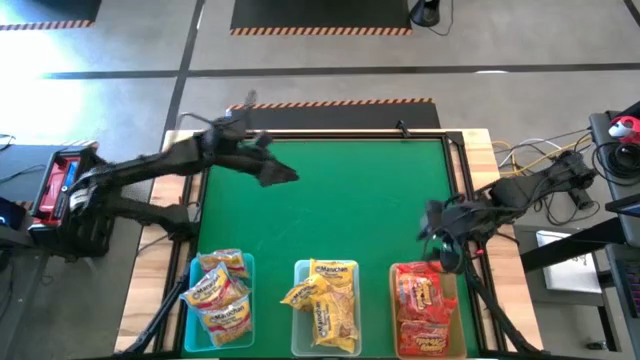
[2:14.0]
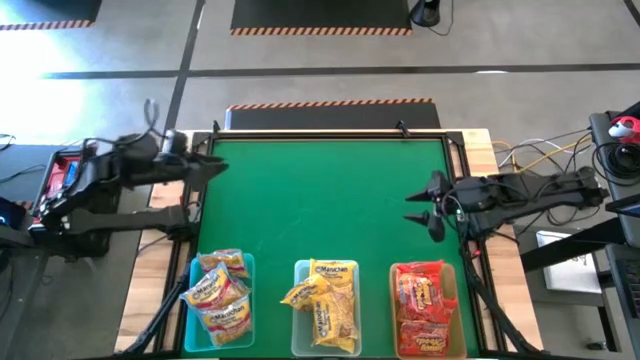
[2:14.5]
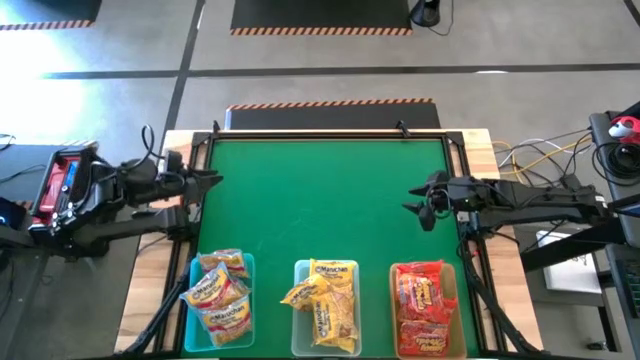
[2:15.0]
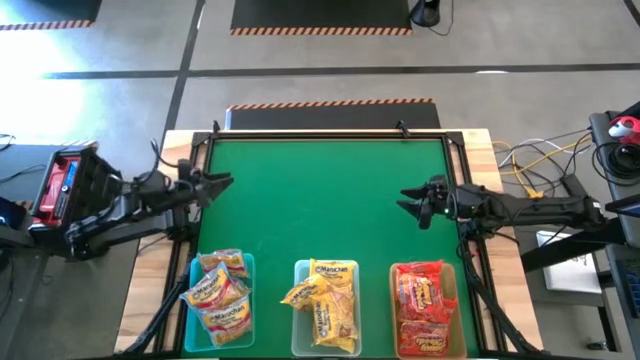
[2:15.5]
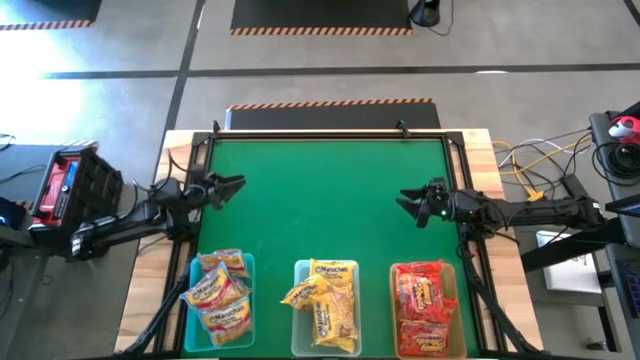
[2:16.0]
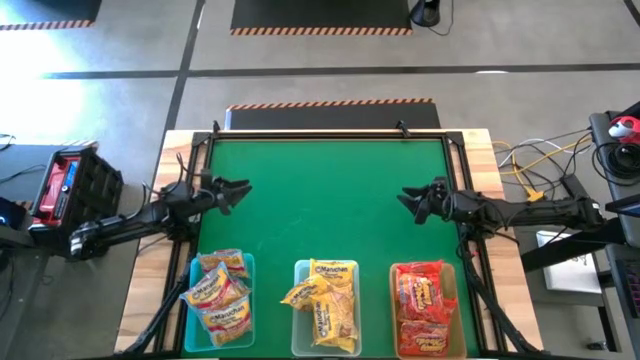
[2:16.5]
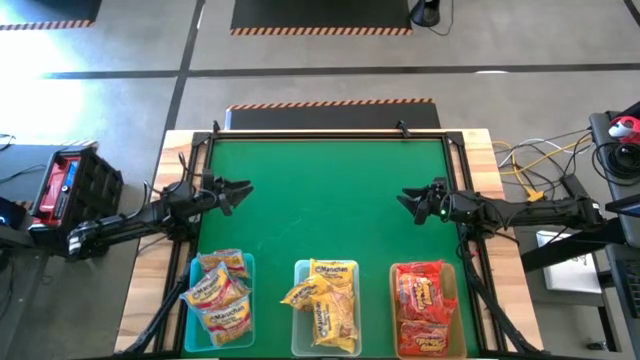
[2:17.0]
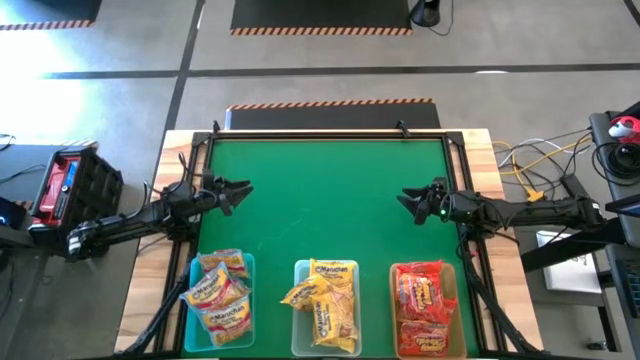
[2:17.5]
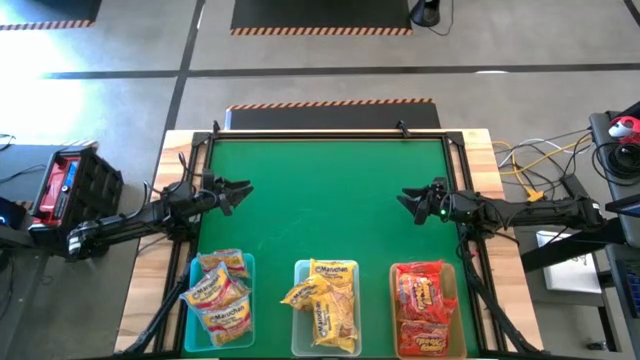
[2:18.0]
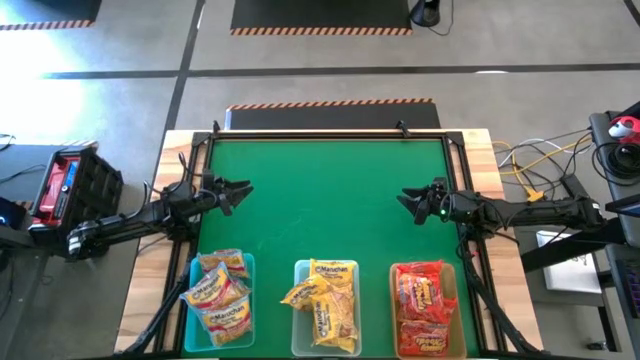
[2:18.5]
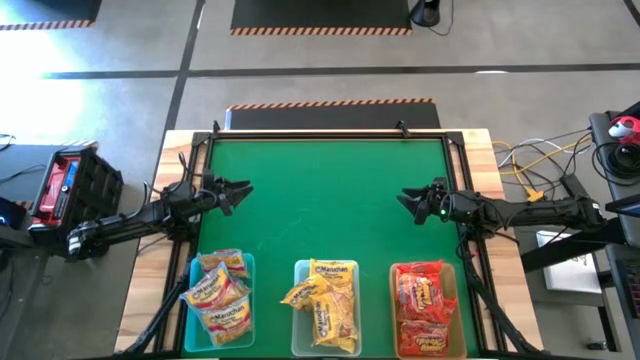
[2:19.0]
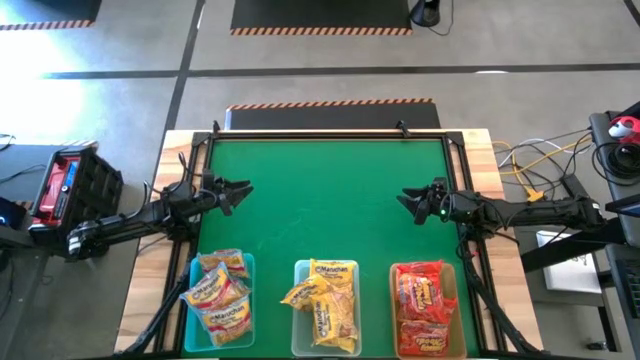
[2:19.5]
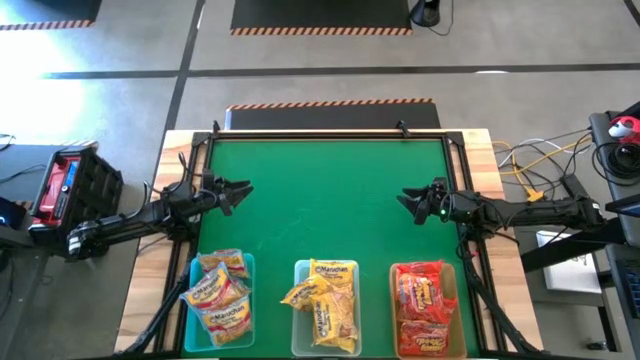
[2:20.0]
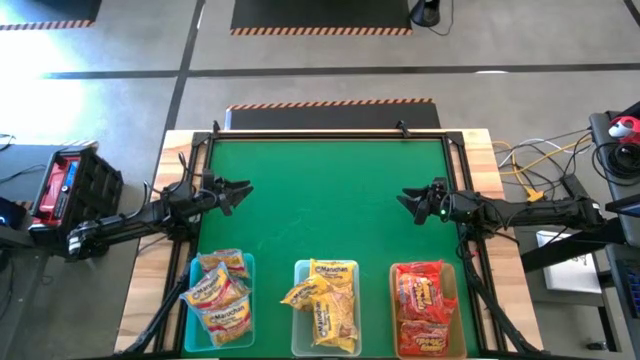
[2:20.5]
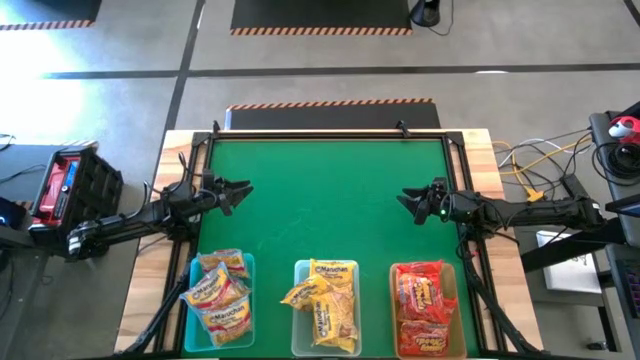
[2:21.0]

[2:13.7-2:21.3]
Task: Sort Maruchan noodles
Return to Home Position

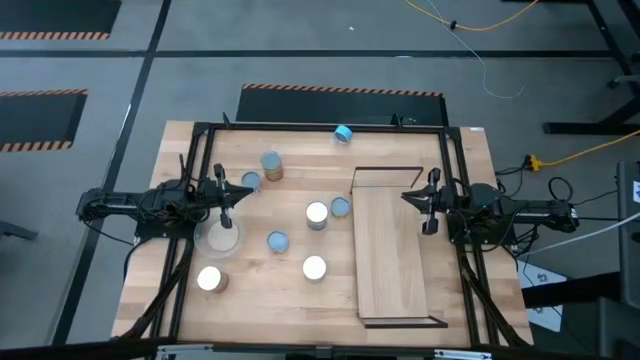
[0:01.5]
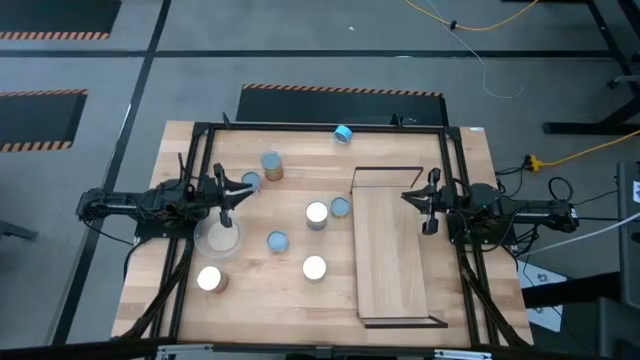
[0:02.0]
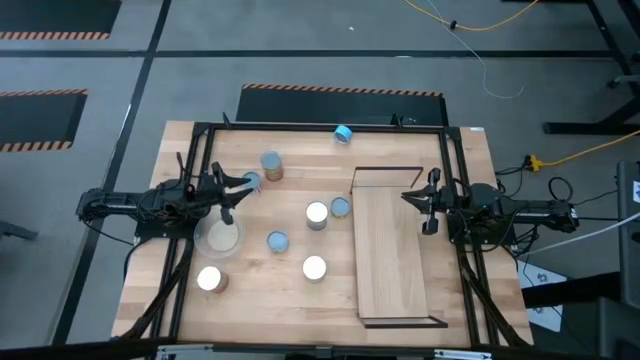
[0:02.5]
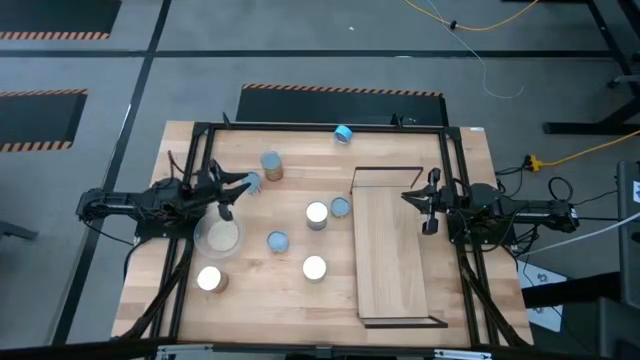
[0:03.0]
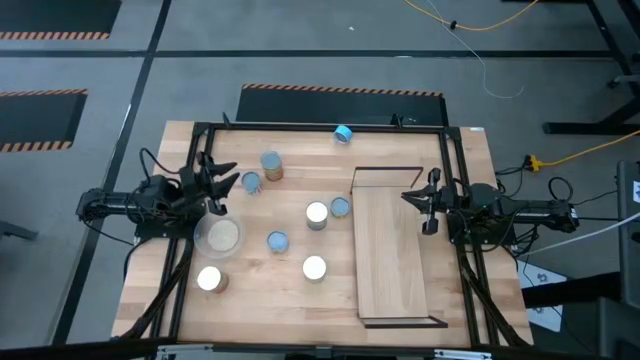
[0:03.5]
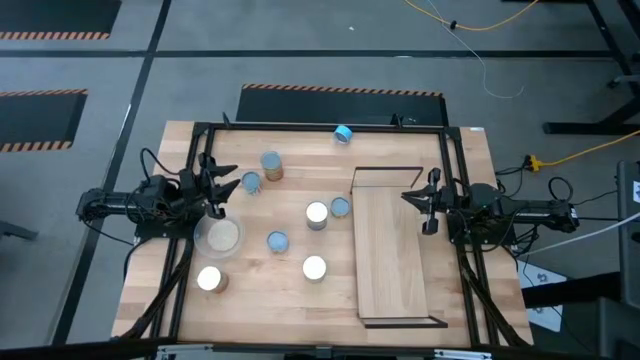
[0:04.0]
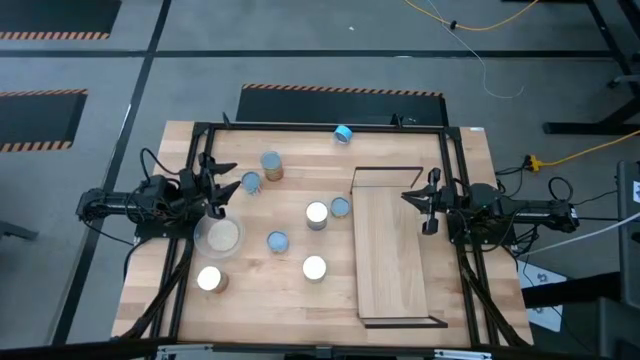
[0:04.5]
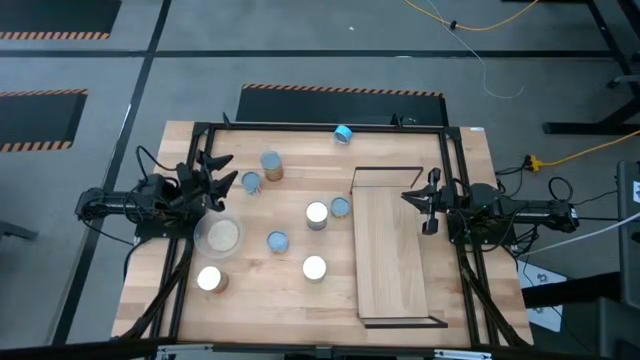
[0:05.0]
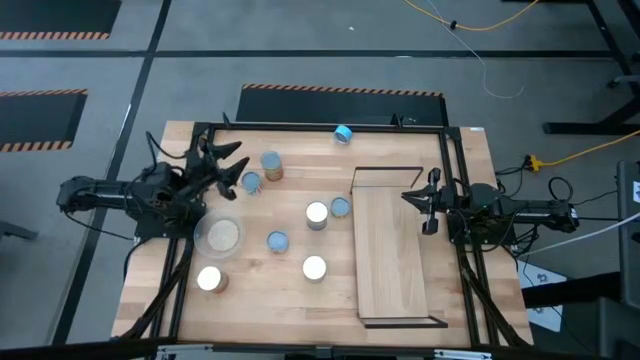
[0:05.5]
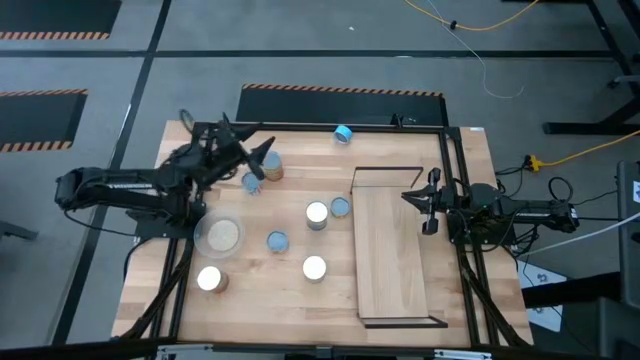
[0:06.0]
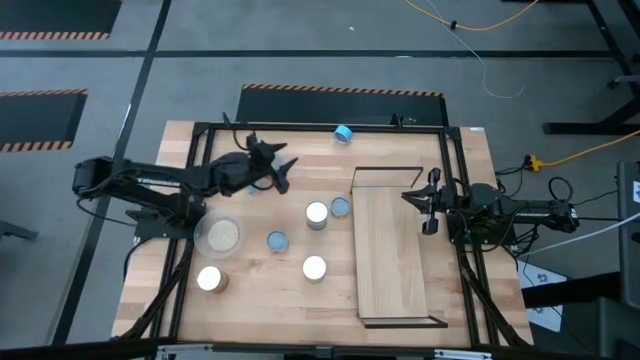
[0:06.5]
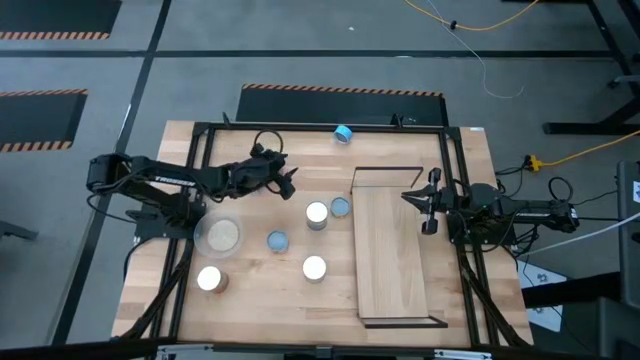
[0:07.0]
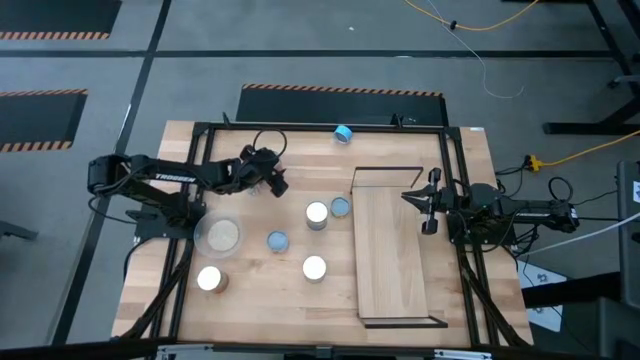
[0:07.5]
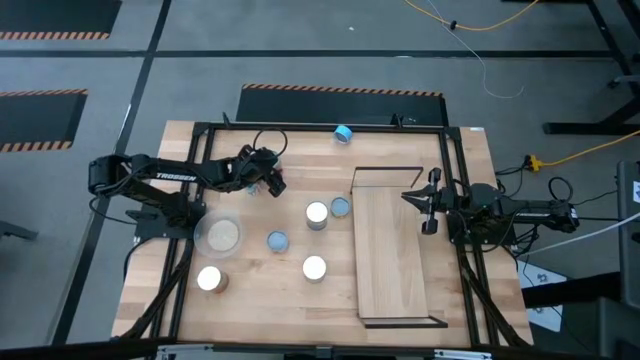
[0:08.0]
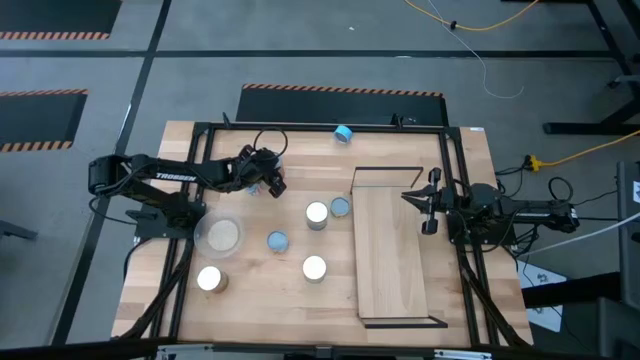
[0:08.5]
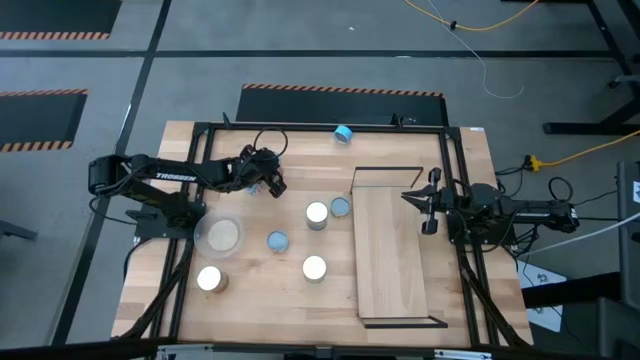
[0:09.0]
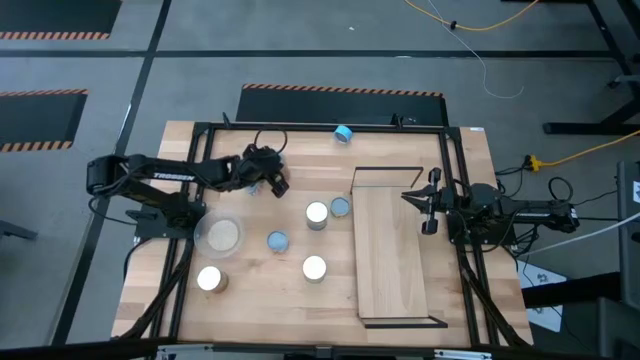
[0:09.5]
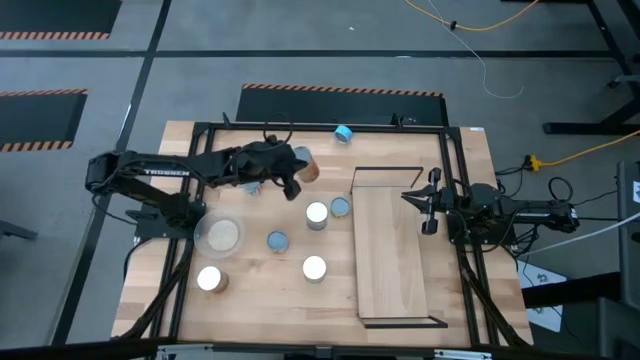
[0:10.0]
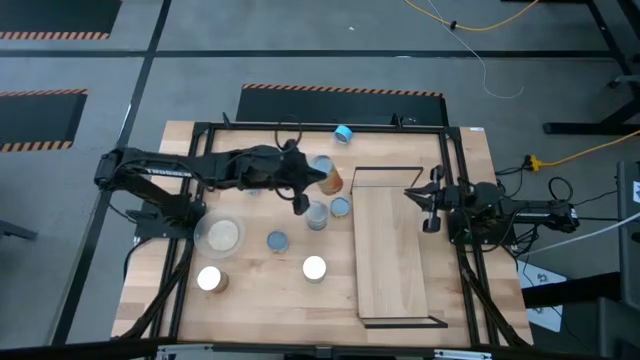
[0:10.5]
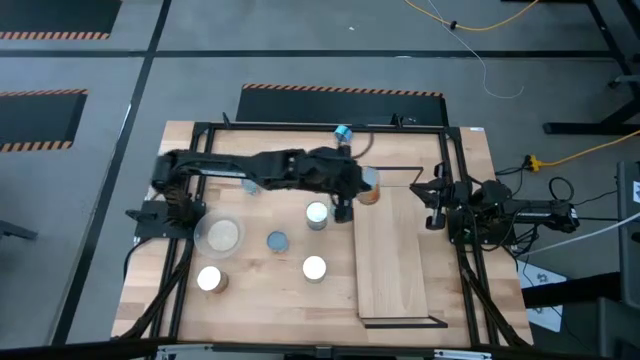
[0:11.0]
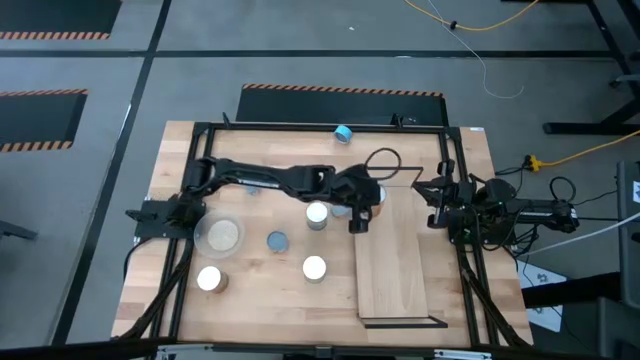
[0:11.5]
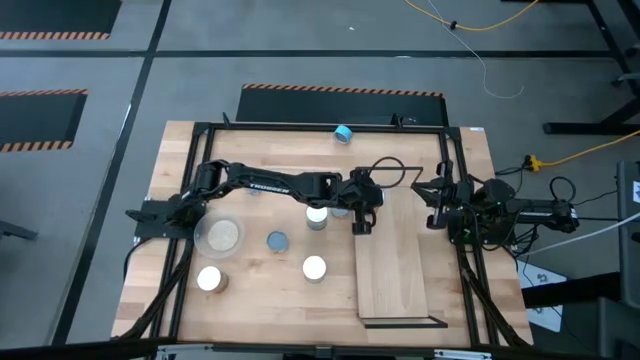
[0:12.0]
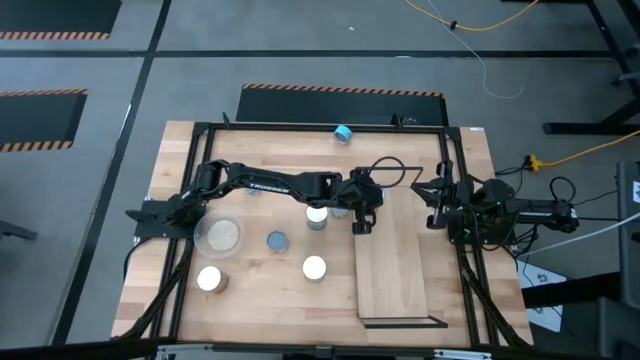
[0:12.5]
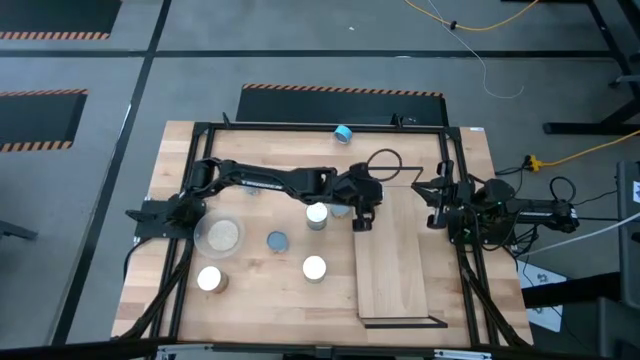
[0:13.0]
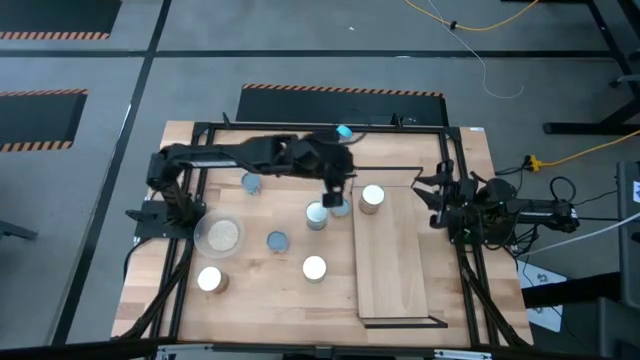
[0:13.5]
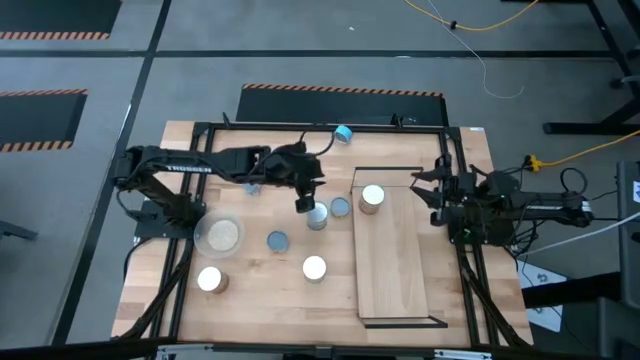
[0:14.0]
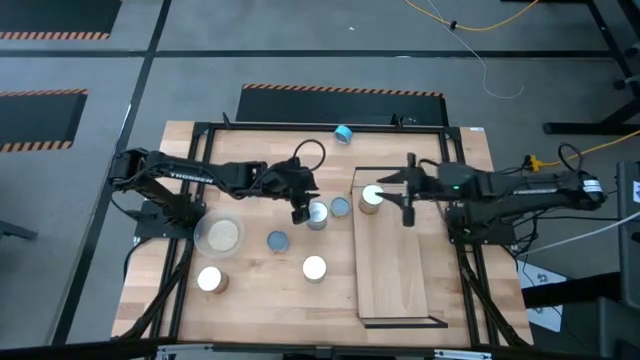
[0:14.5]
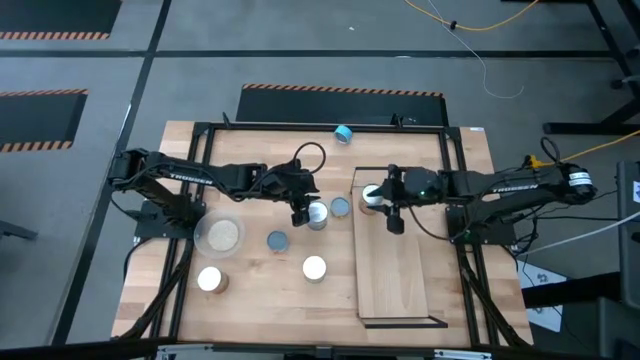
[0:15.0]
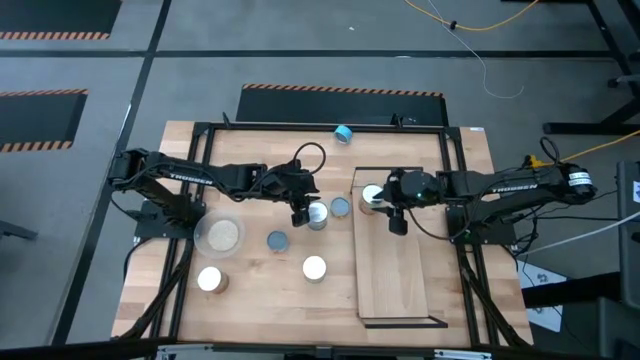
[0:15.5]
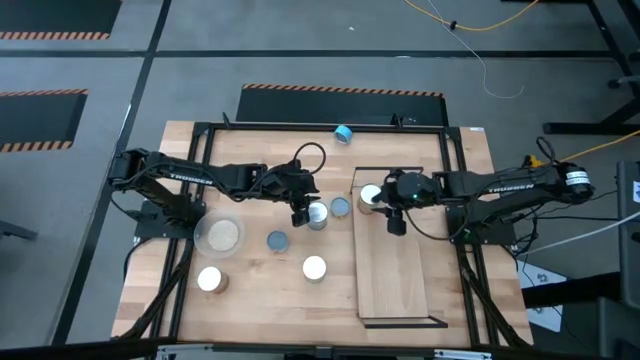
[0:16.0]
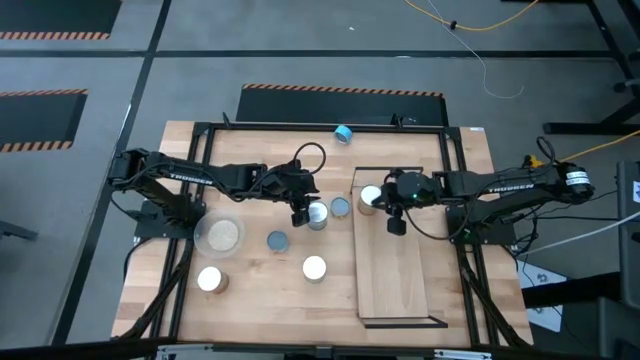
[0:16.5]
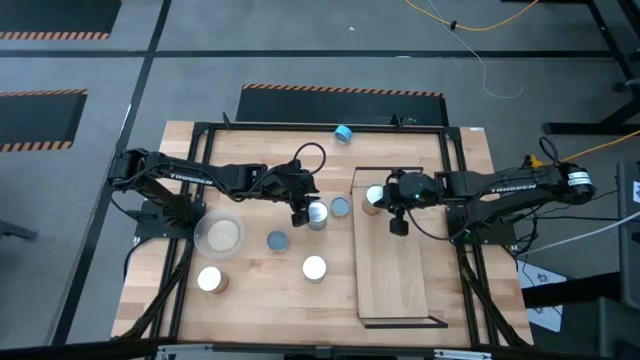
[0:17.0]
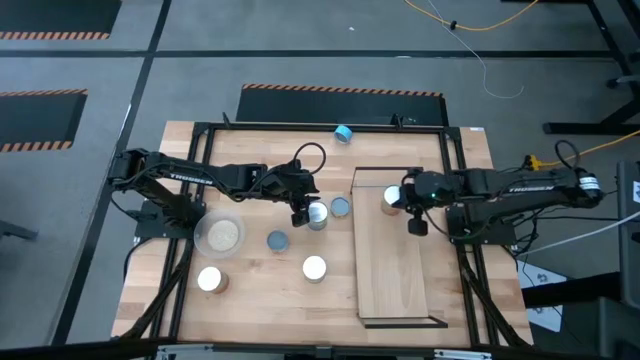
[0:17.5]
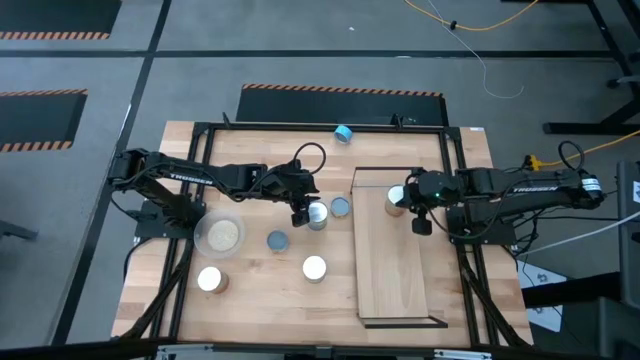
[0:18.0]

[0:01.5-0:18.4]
Task: Pick and place cans onto a shelf
Put the top orange can onto the shelf
